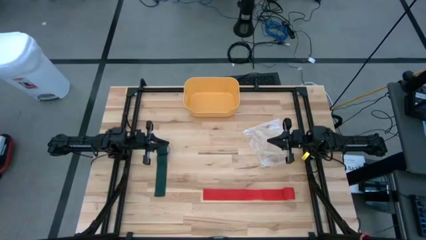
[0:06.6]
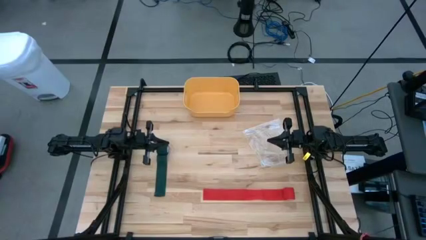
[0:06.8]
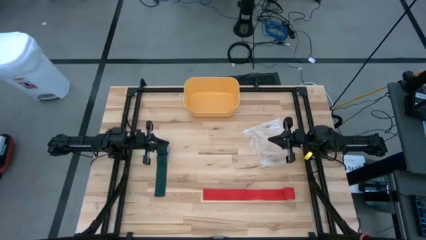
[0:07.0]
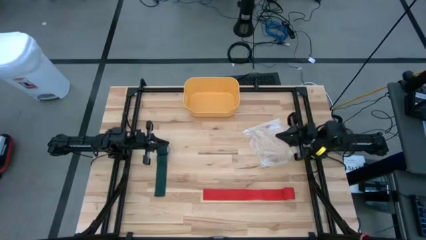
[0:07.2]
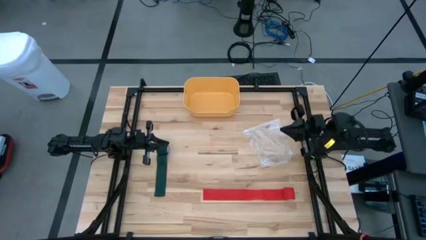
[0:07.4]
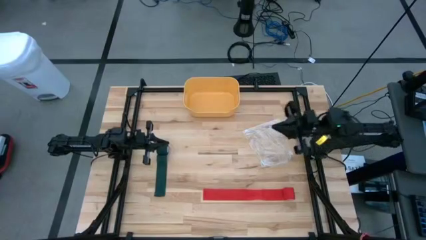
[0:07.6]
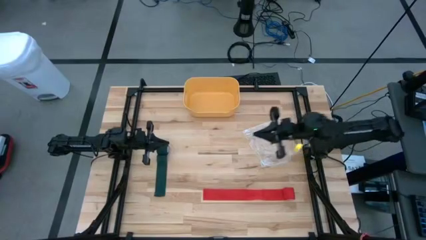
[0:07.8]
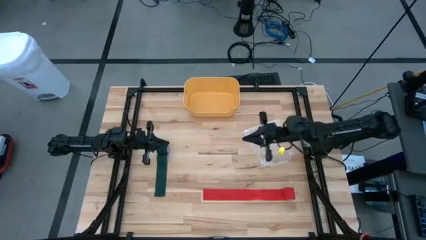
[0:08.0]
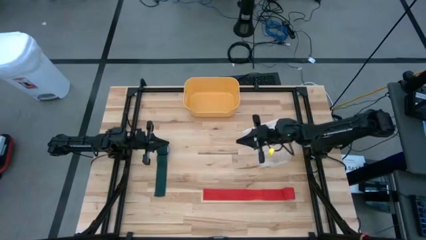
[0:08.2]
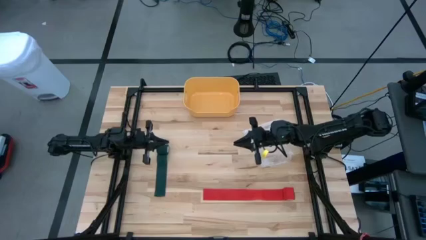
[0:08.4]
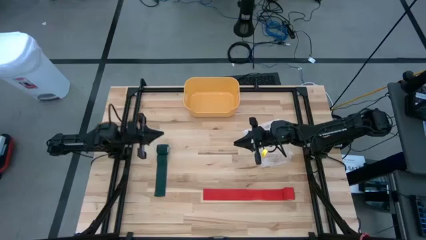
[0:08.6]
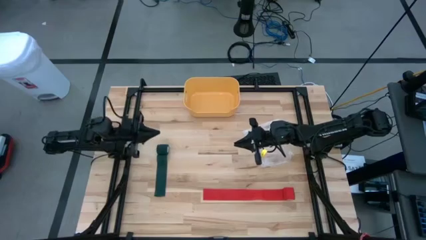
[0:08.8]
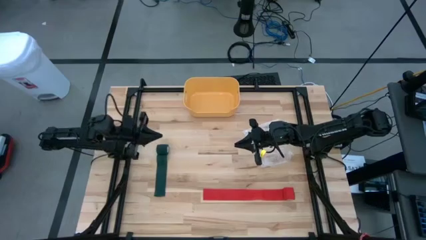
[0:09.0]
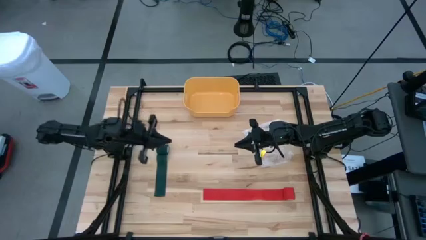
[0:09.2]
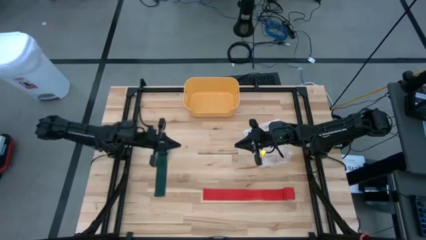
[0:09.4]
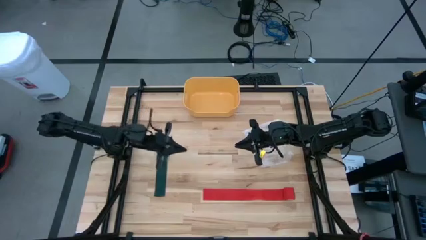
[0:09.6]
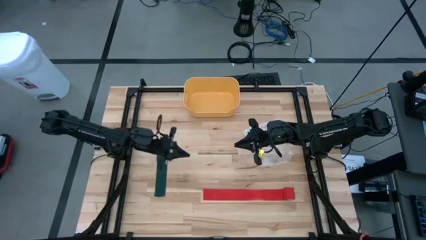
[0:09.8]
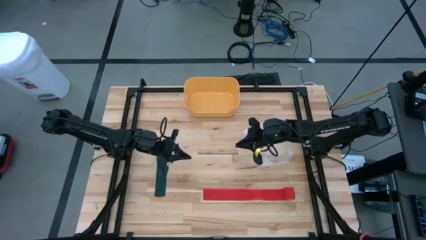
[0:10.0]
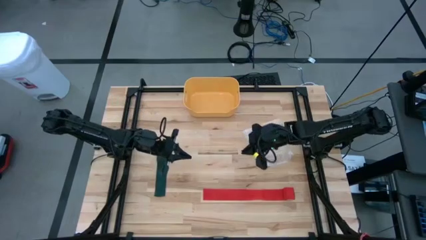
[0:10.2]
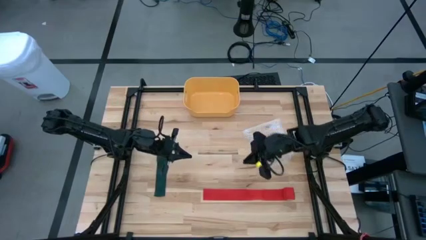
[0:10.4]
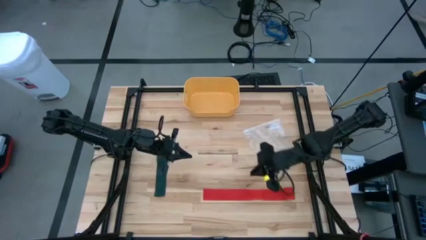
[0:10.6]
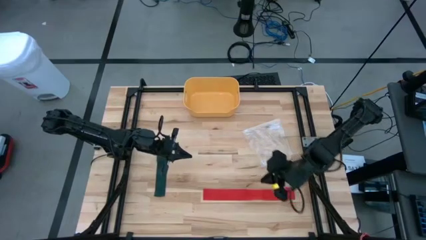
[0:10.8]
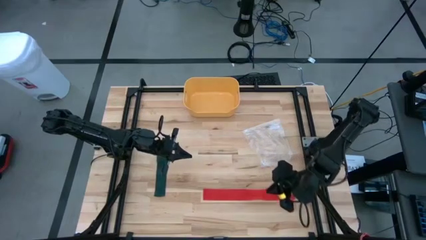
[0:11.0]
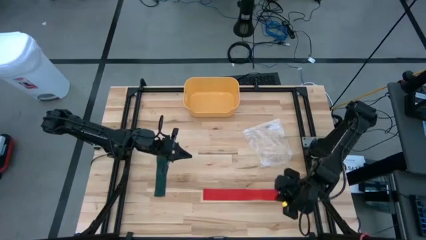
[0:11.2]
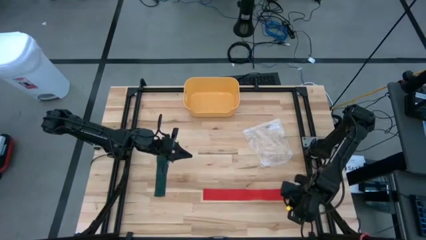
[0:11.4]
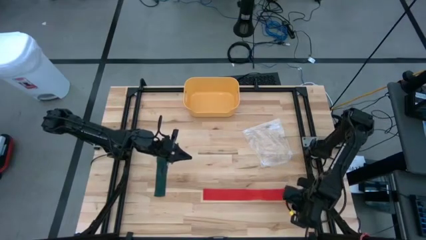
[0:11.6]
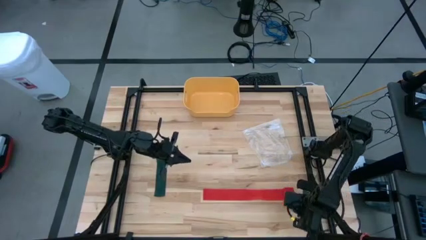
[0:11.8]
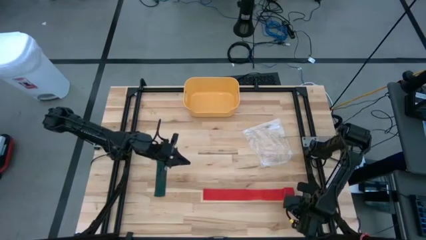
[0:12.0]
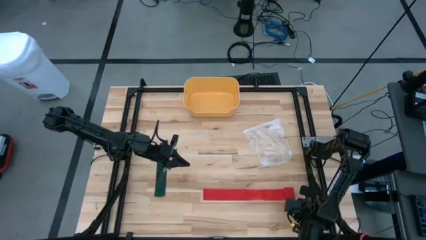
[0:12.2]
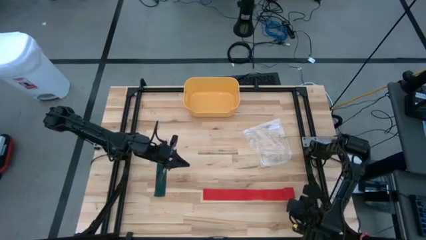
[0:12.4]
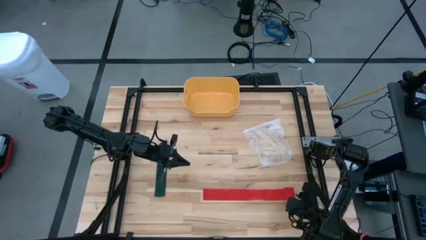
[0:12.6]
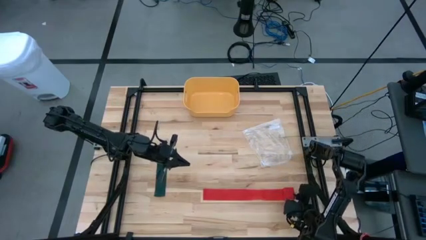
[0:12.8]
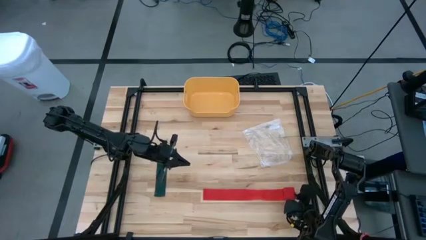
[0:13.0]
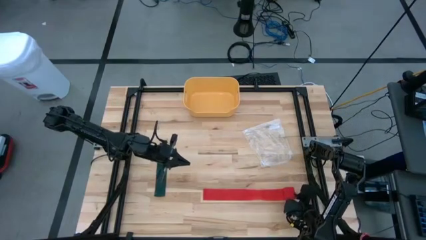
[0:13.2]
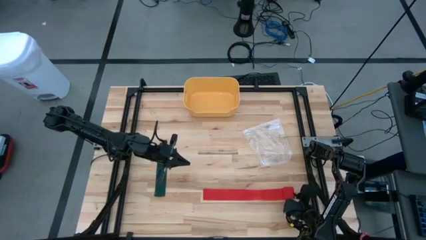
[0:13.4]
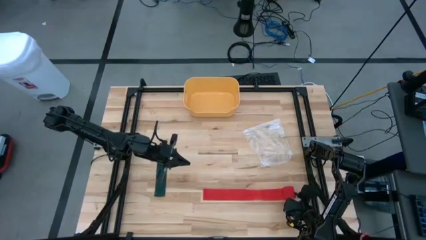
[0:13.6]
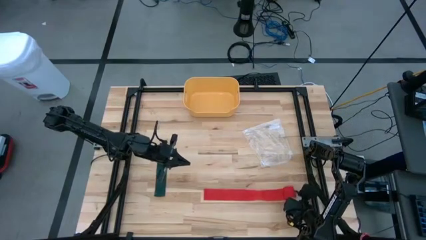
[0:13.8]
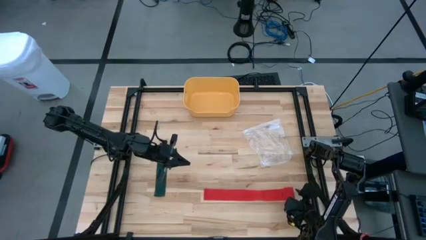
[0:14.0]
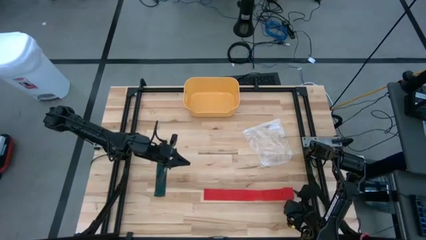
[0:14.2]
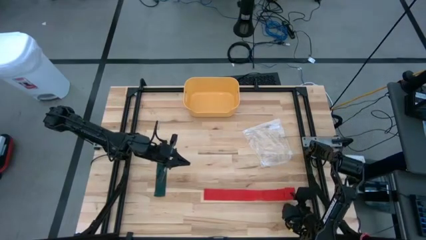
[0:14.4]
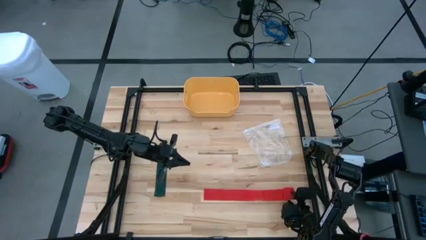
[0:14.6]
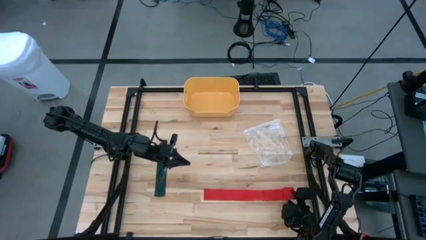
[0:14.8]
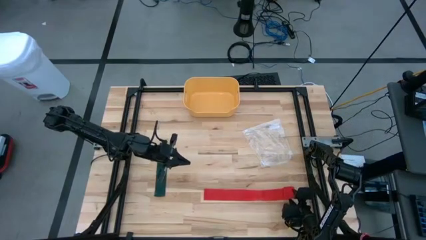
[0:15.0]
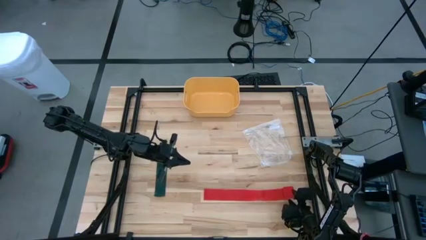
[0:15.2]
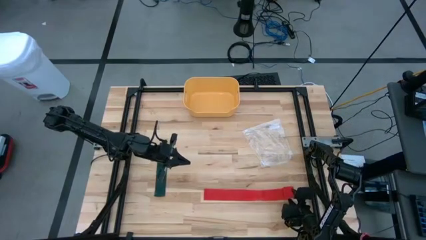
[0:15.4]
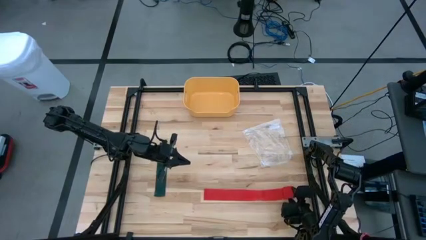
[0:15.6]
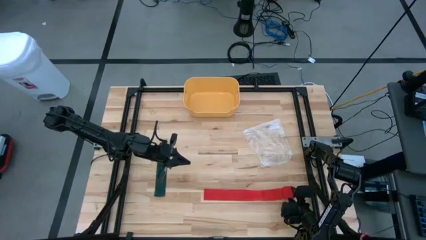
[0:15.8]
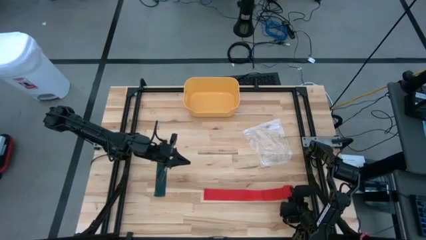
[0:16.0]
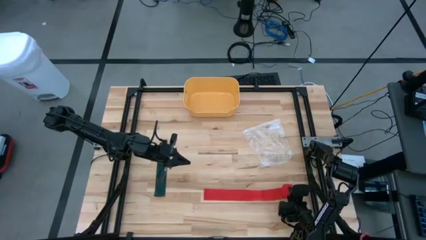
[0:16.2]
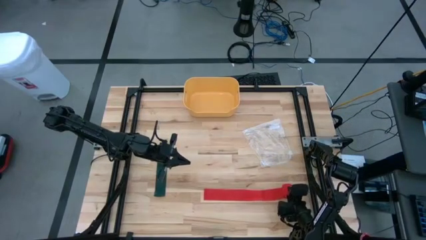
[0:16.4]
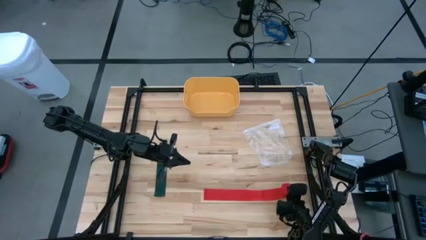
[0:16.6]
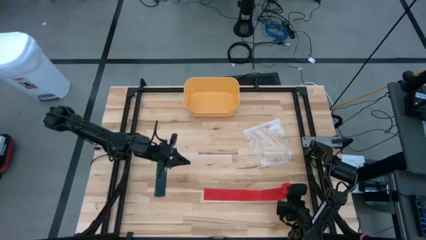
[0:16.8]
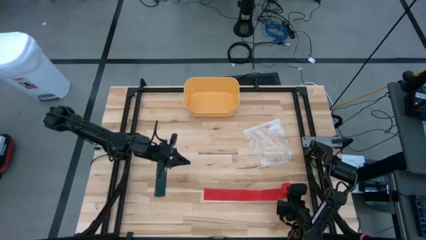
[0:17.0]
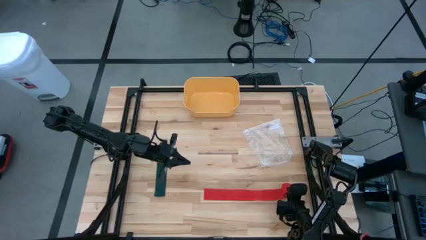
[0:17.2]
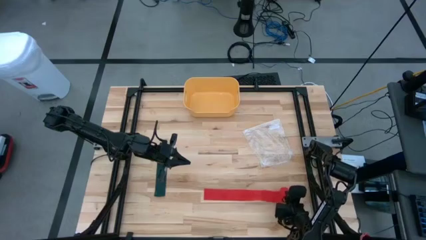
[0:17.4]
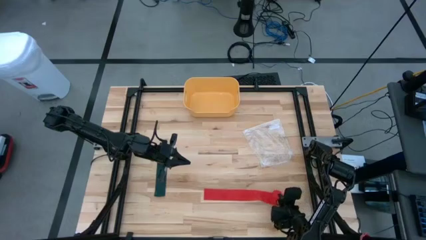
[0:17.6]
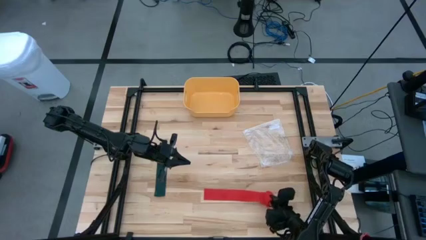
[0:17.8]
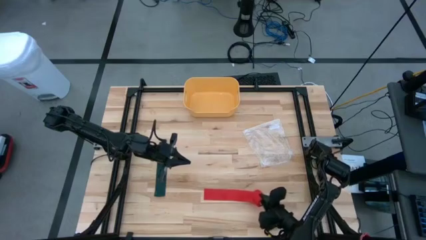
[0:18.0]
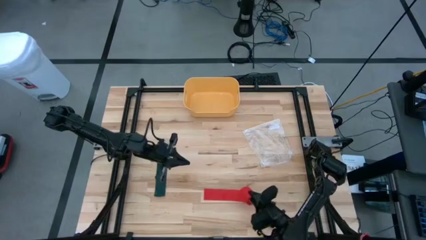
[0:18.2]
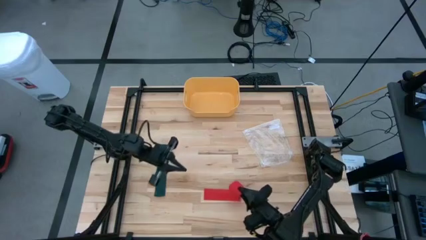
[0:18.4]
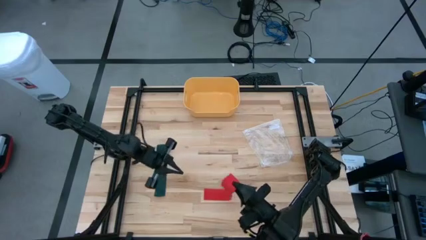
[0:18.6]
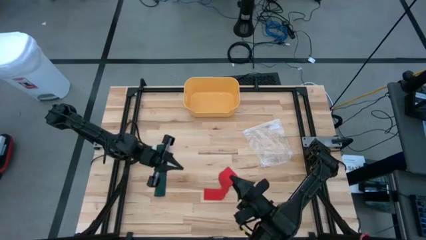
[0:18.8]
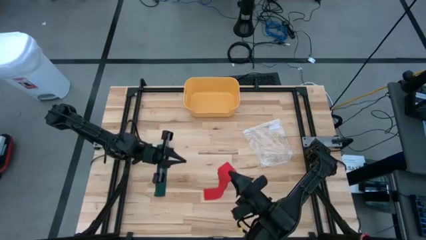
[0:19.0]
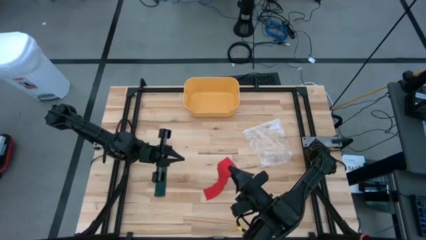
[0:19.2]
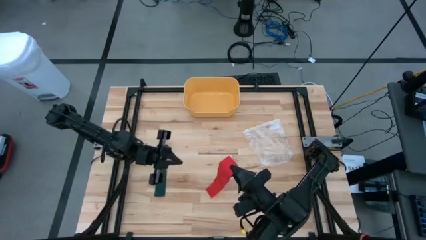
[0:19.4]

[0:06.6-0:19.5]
Task: Roll bandage
Roll the red bandage
